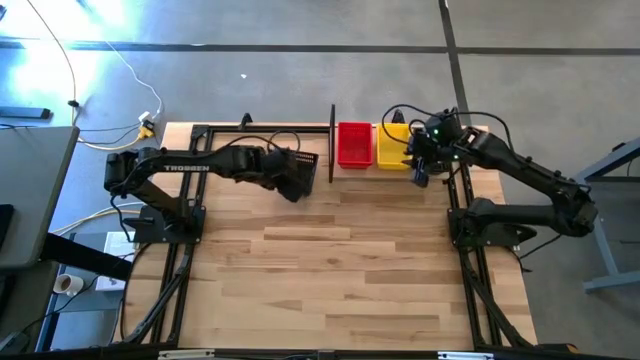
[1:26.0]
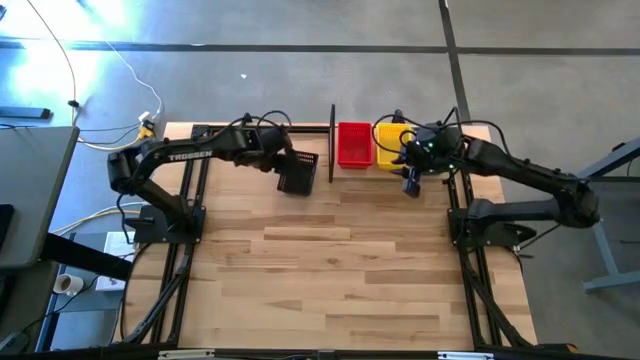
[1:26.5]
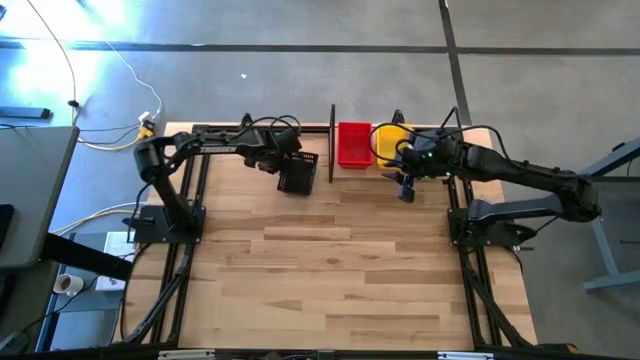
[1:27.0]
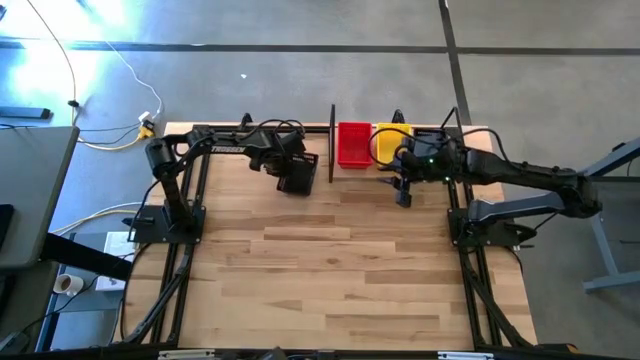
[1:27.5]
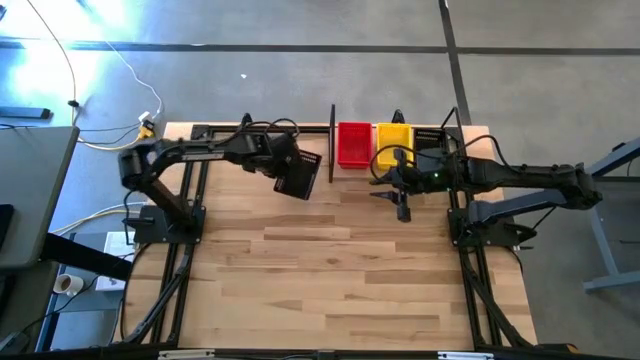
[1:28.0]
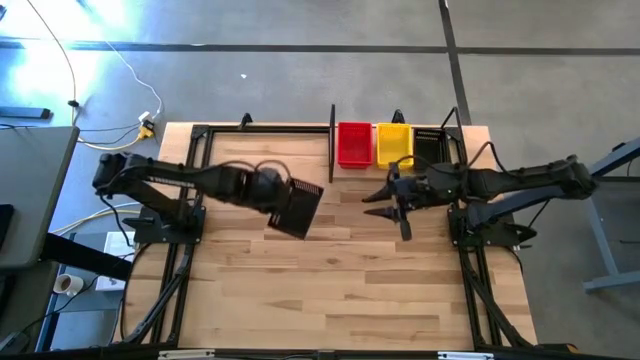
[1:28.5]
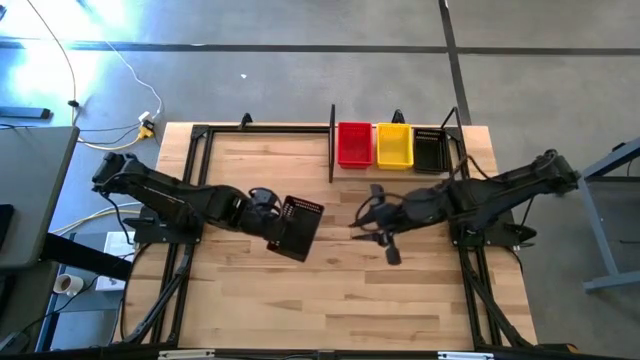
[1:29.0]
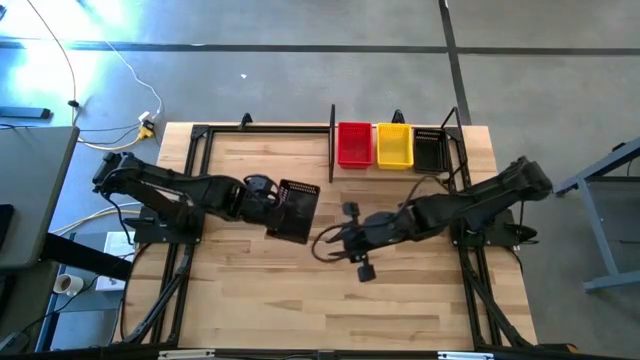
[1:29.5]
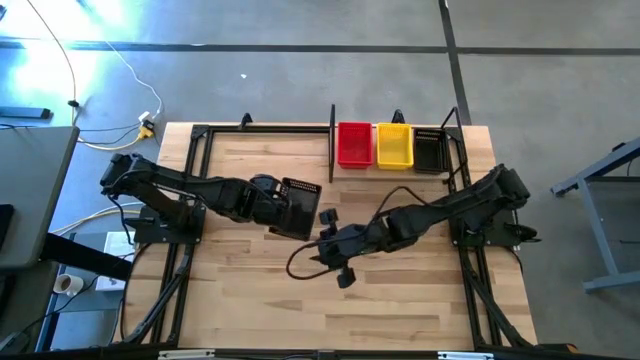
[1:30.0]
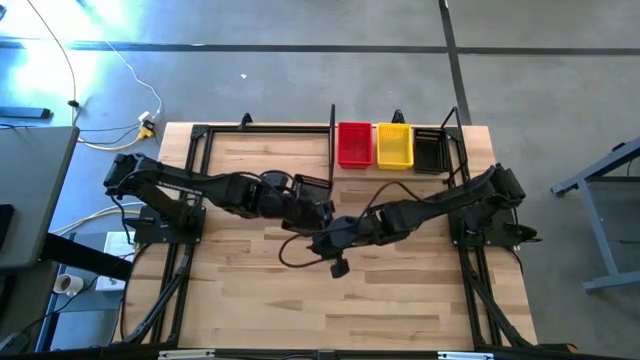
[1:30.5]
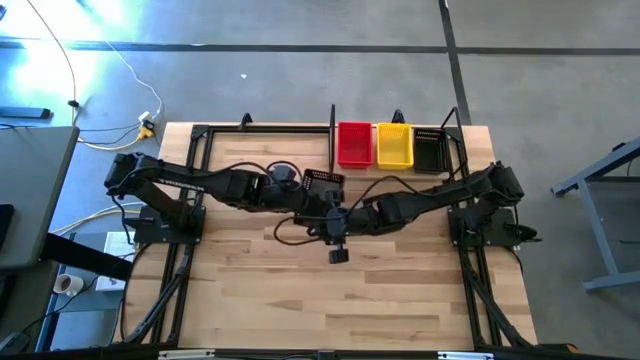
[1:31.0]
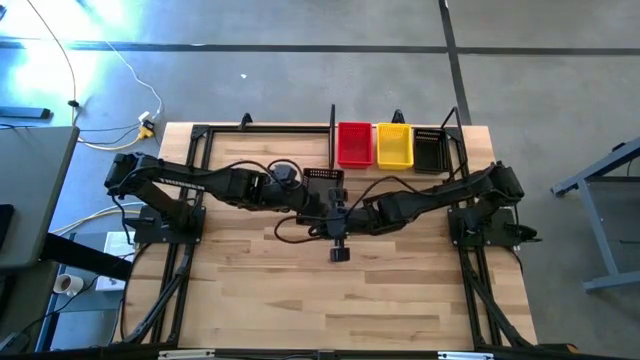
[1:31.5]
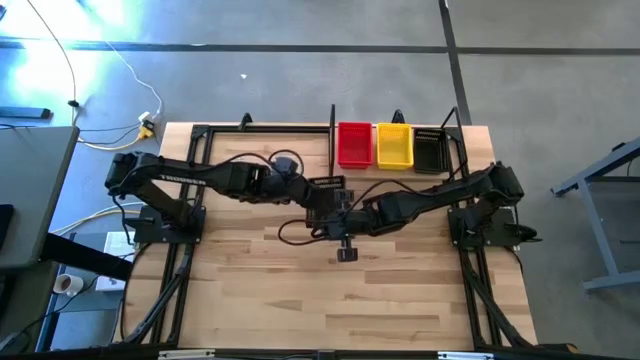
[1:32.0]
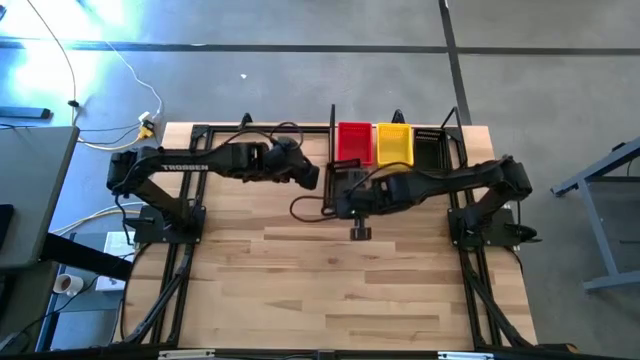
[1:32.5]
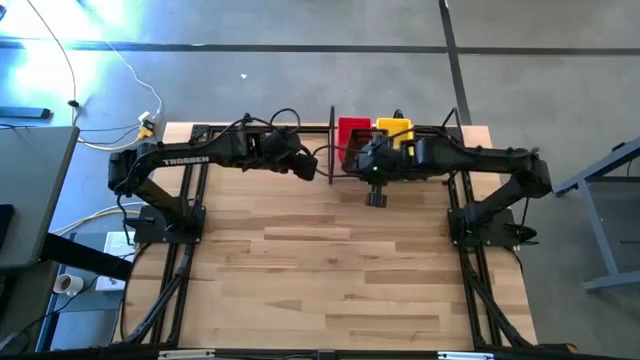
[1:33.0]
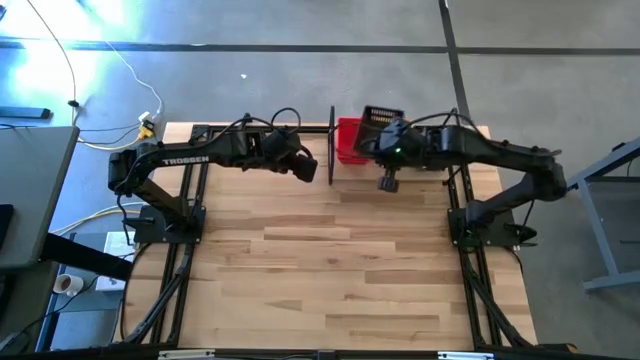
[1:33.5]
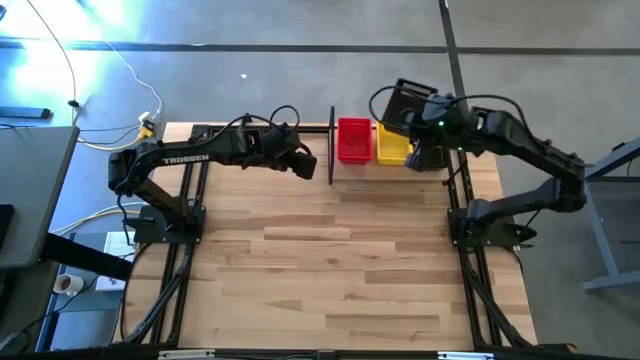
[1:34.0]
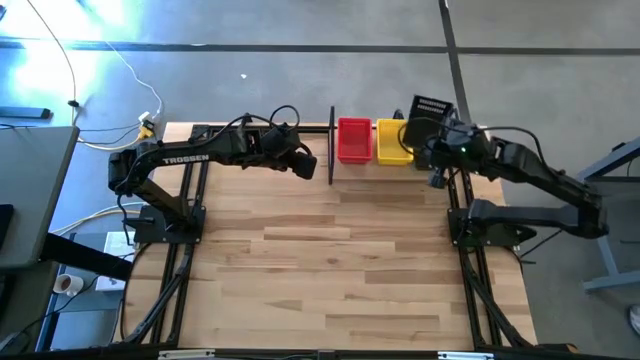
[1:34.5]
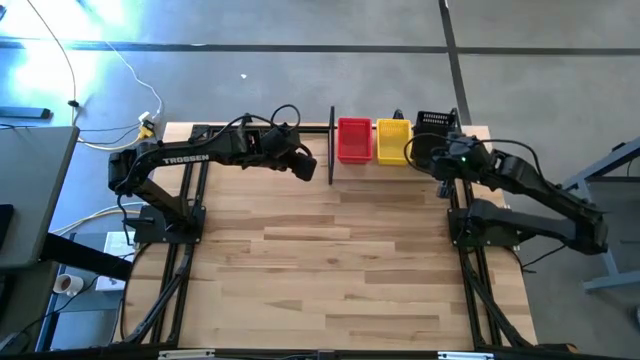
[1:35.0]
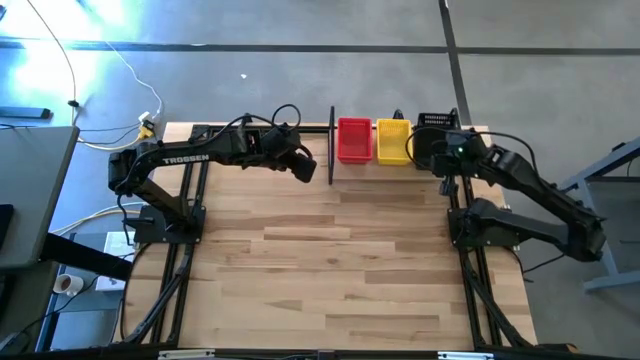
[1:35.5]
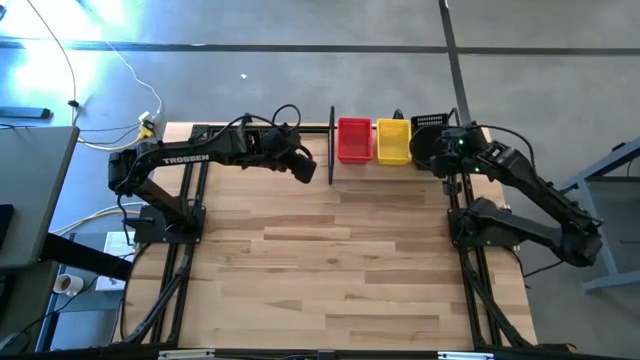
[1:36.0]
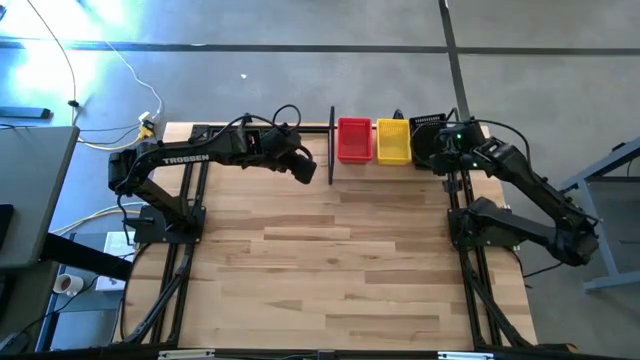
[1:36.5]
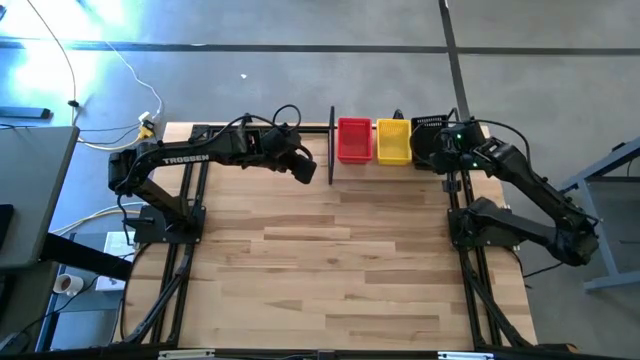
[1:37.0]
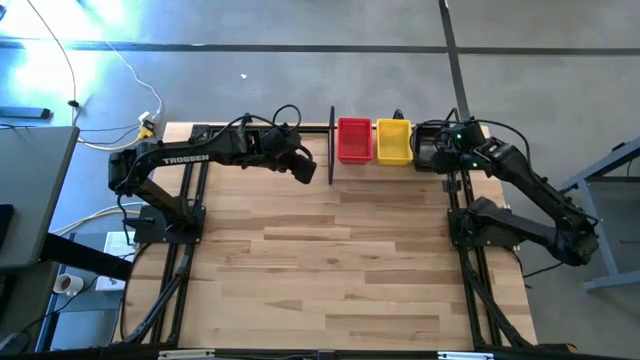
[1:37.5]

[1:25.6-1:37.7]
Task: Stack baskets on shelf by color
Stack the black bin on top of the black bin on the shelf

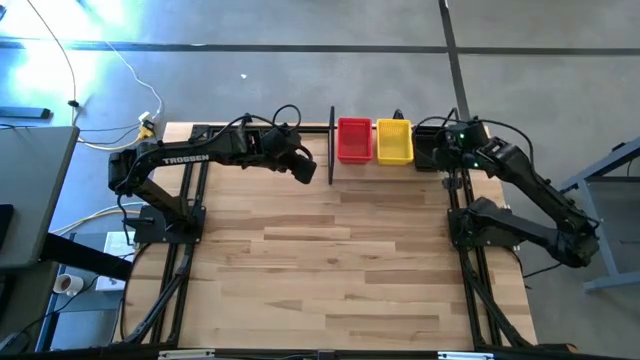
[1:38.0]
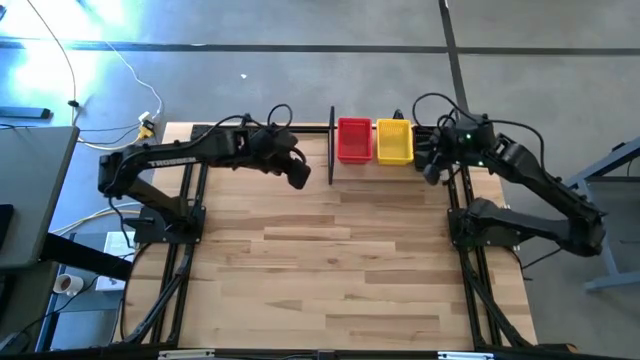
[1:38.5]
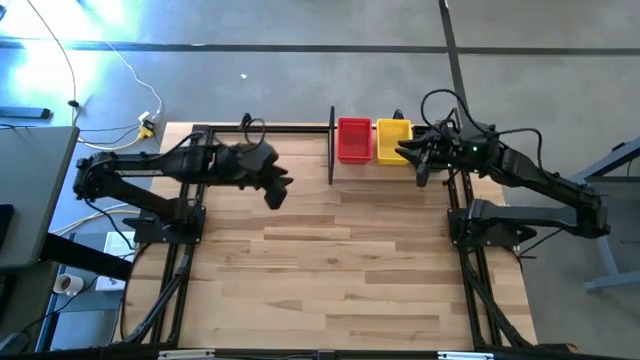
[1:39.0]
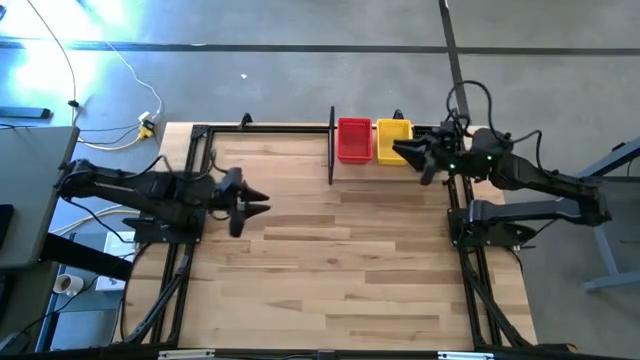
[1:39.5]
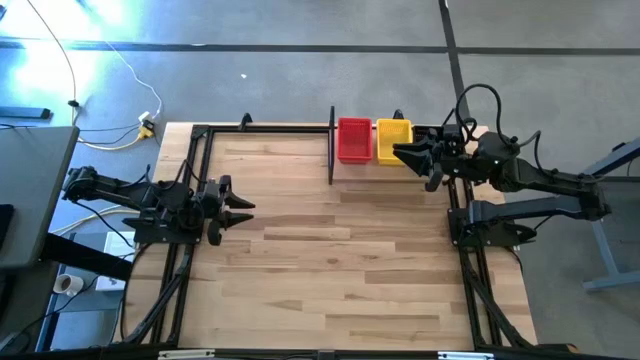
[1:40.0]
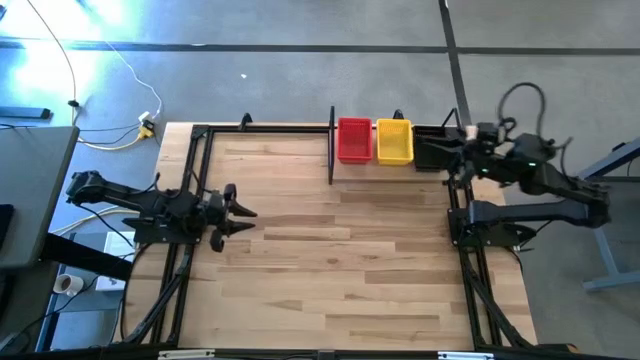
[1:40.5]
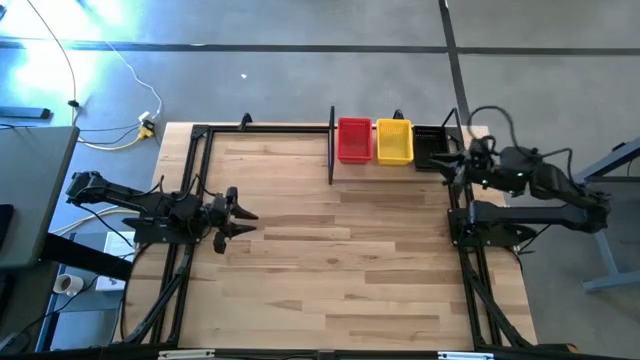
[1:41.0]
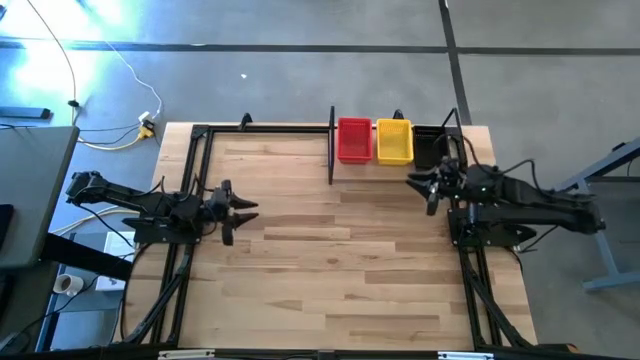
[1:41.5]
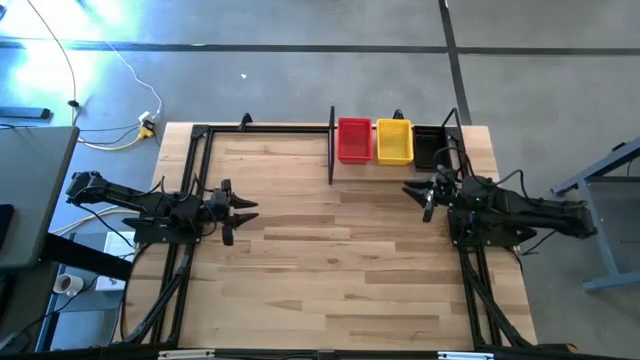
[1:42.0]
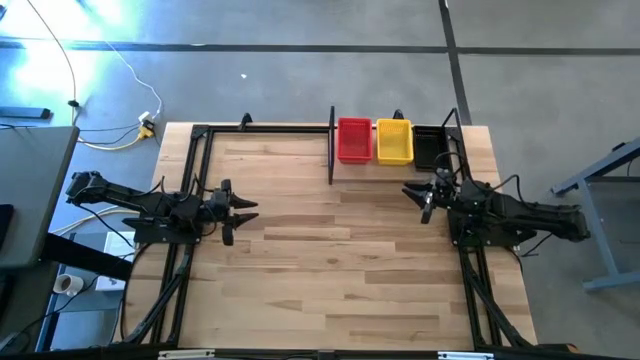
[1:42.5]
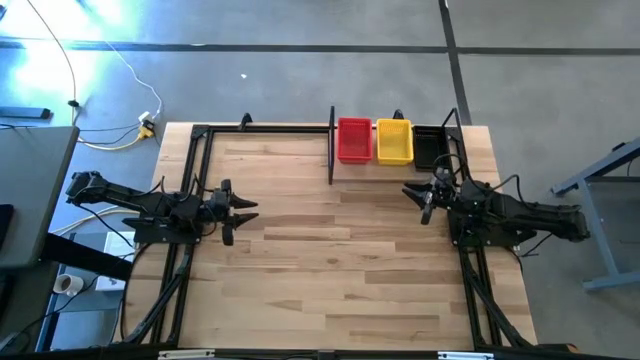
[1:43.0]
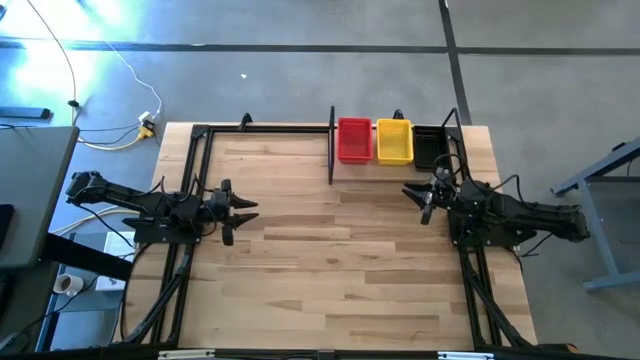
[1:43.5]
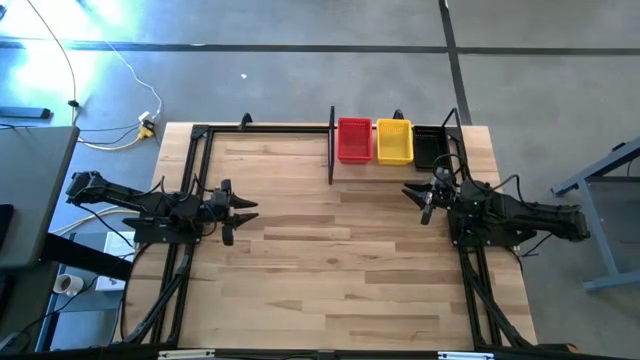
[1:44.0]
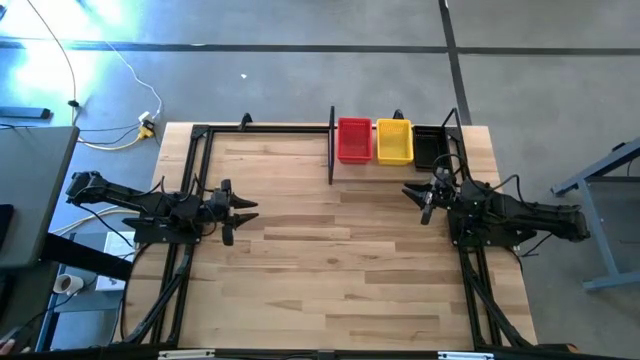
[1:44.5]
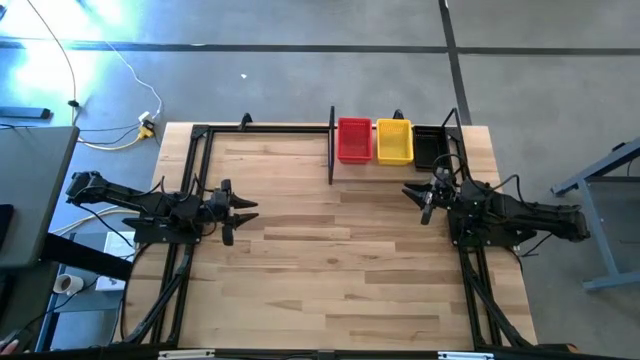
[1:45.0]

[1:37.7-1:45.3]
Return to Home Position

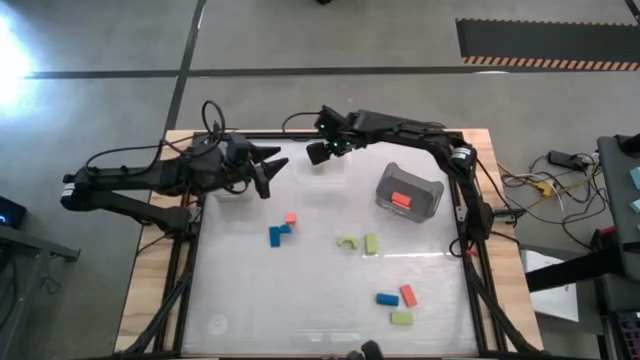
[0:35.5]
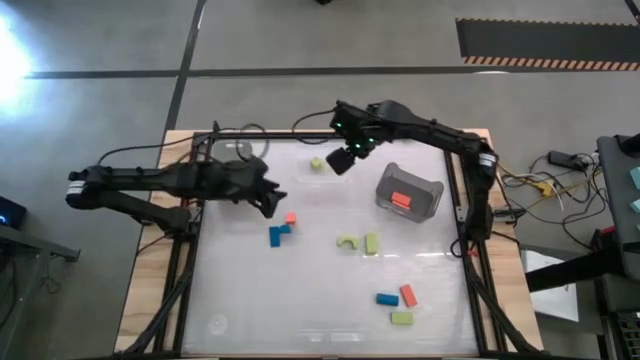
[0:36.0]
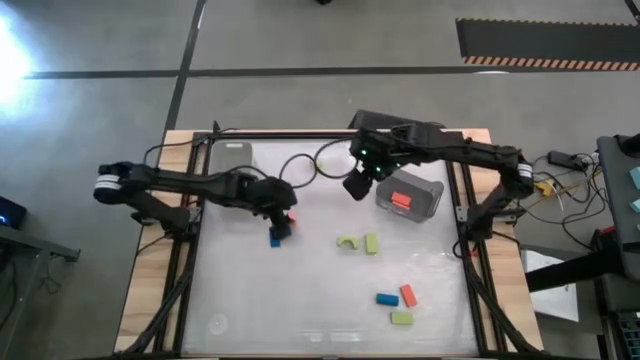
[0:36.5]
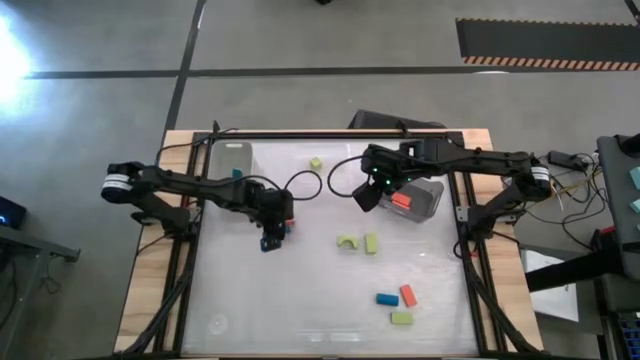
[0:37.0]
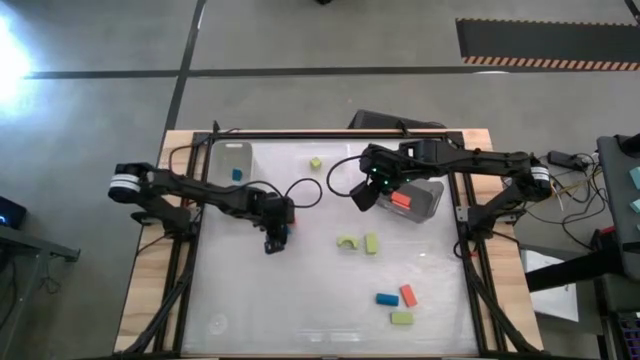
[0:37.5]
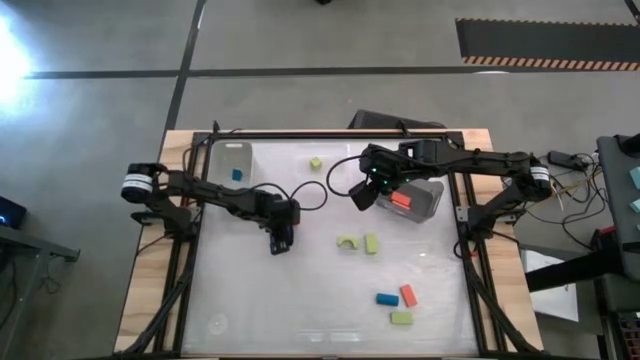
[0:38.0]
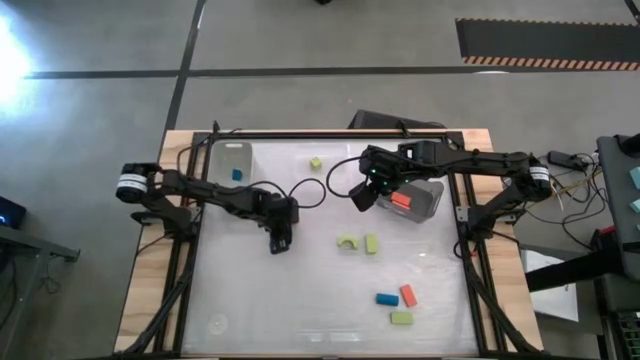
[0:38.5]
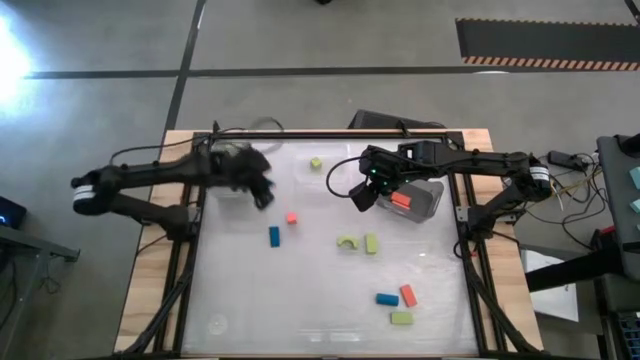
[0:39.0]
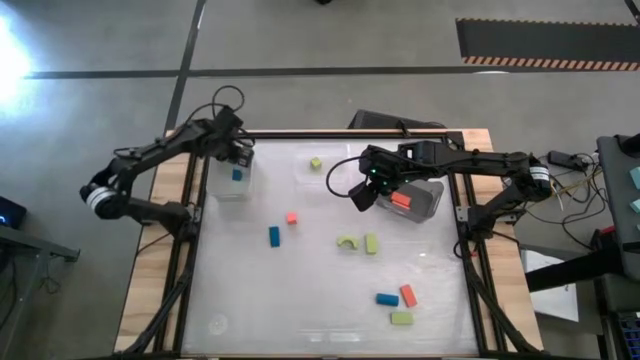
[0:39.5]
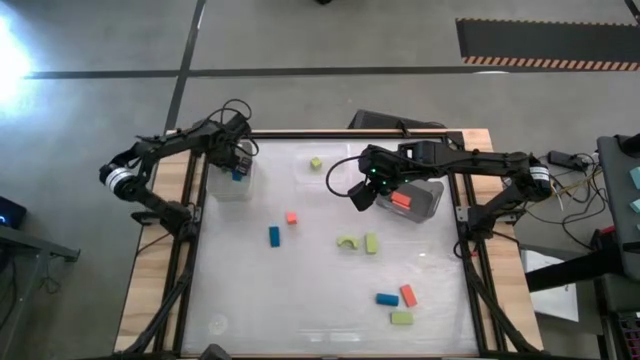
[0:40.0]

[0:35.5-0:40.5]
Task: Sort & place blocks by color
Put the blue block into the gray bin
